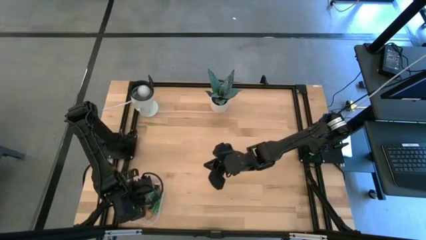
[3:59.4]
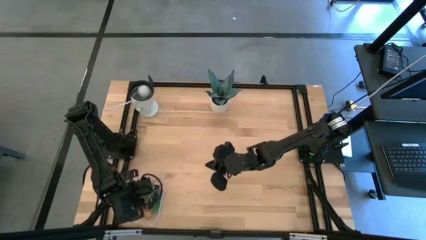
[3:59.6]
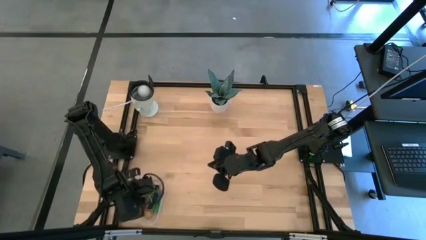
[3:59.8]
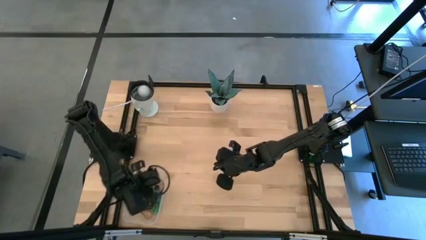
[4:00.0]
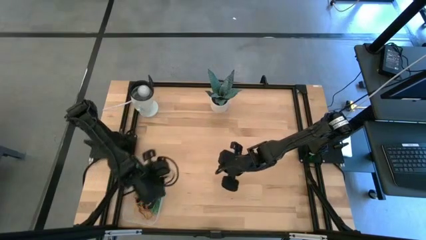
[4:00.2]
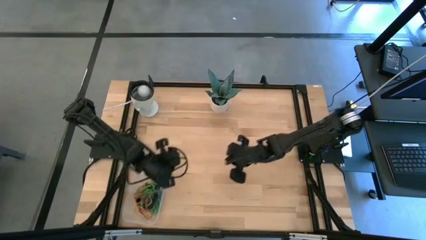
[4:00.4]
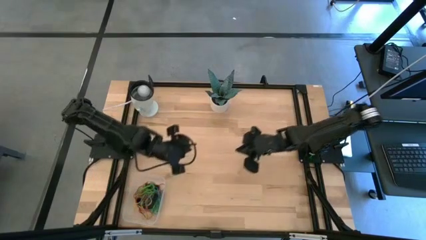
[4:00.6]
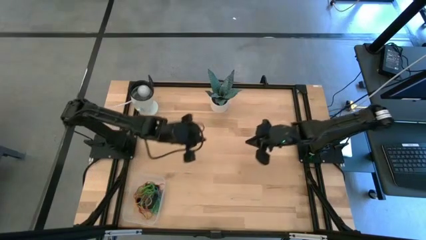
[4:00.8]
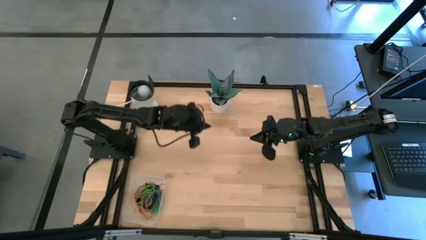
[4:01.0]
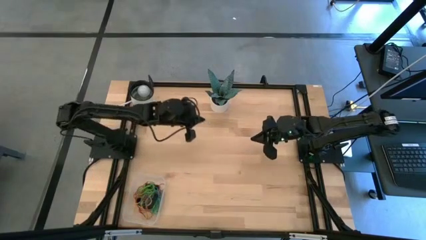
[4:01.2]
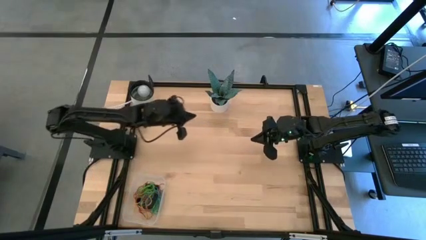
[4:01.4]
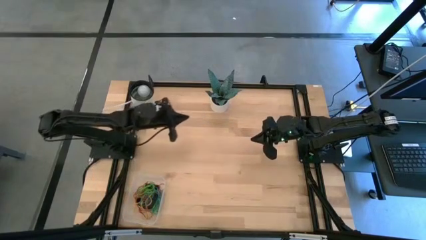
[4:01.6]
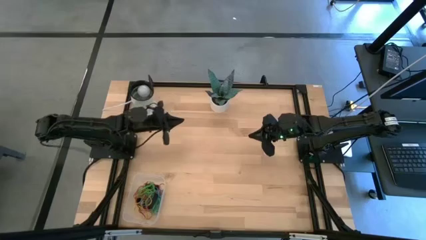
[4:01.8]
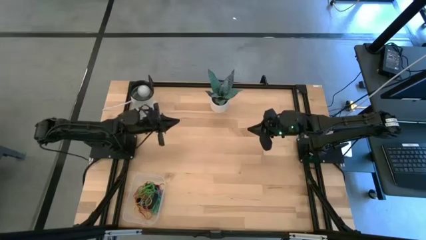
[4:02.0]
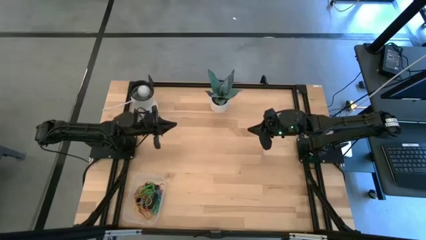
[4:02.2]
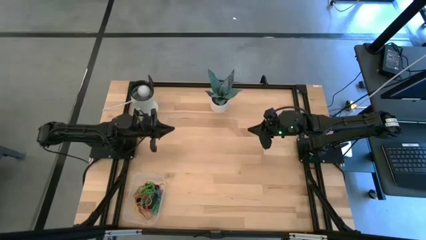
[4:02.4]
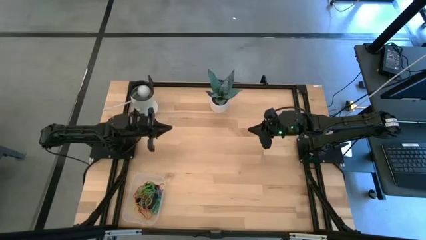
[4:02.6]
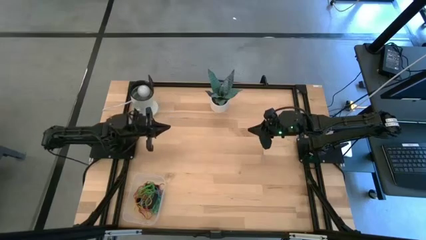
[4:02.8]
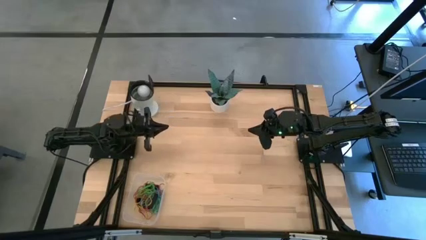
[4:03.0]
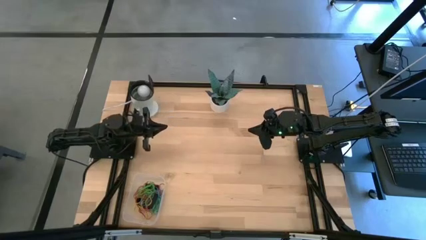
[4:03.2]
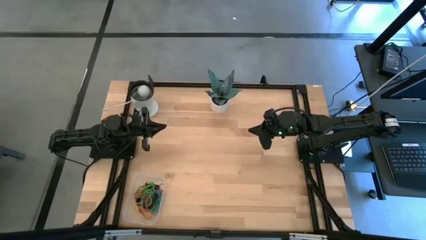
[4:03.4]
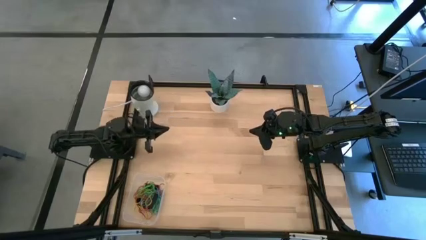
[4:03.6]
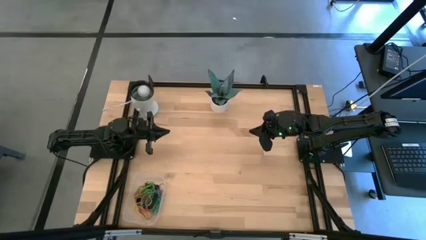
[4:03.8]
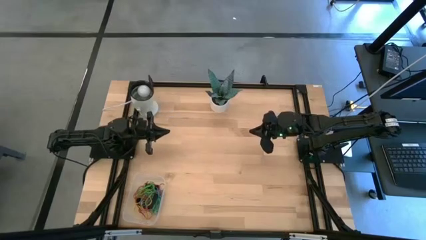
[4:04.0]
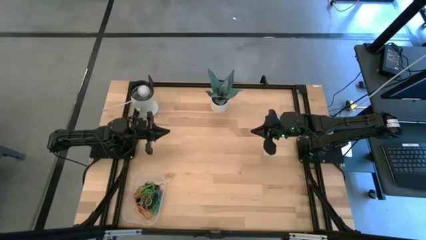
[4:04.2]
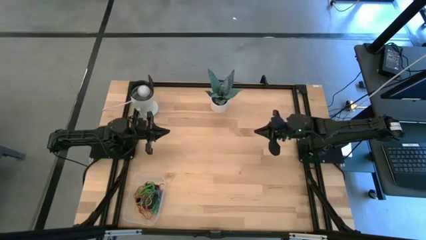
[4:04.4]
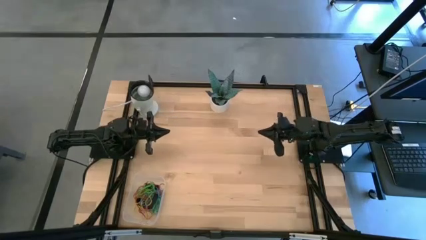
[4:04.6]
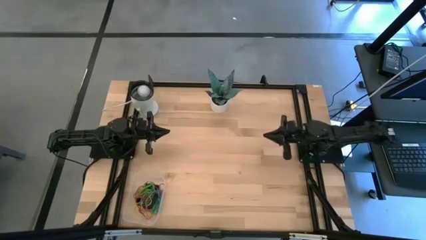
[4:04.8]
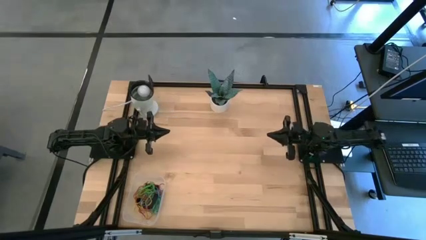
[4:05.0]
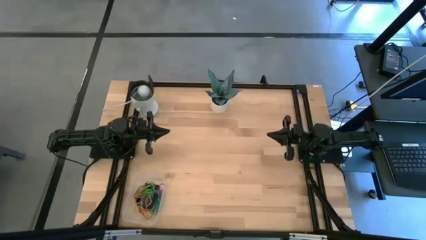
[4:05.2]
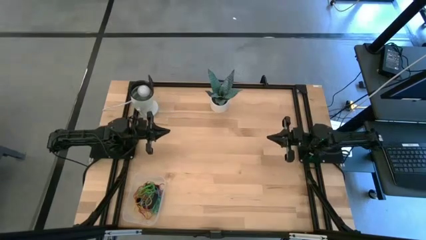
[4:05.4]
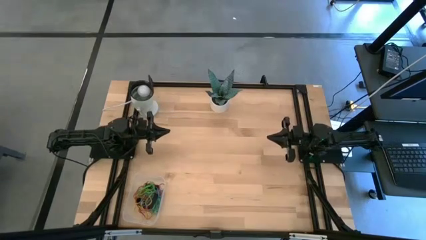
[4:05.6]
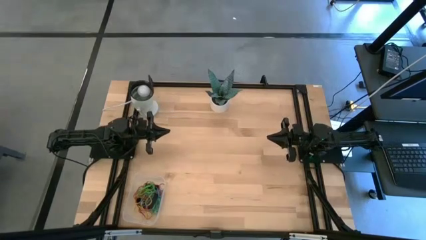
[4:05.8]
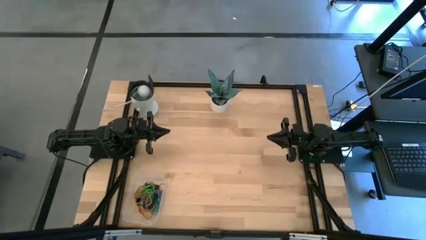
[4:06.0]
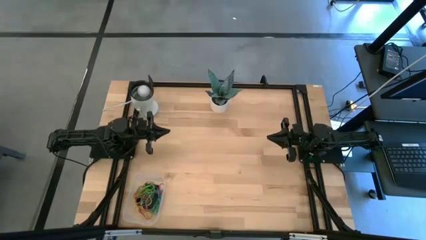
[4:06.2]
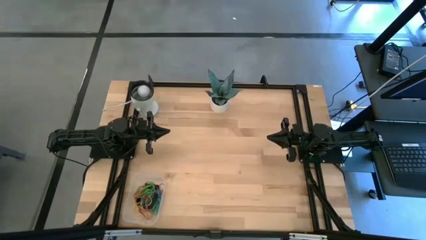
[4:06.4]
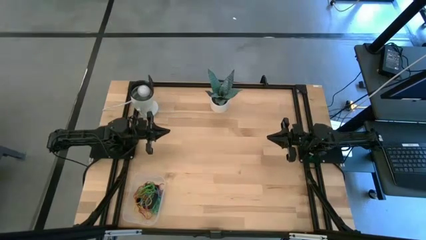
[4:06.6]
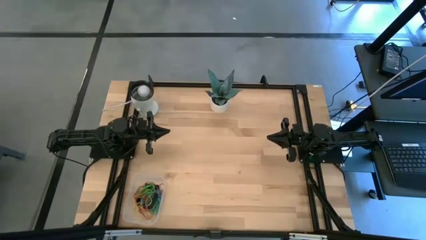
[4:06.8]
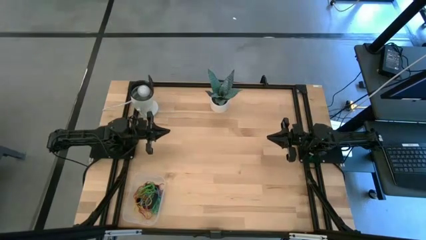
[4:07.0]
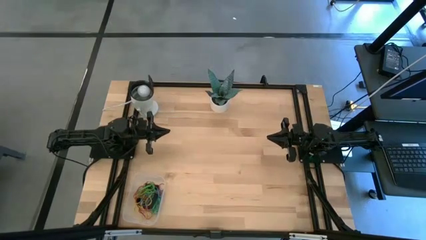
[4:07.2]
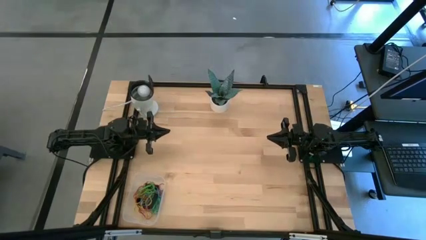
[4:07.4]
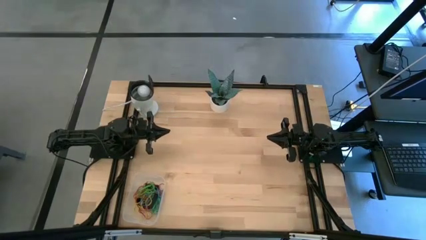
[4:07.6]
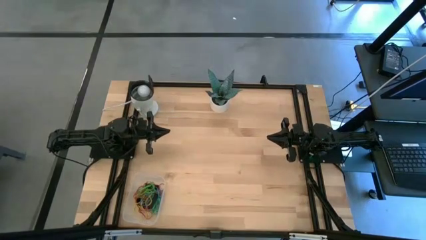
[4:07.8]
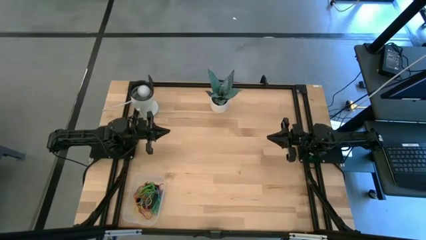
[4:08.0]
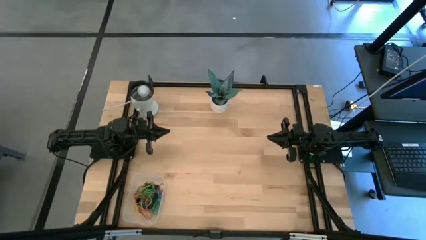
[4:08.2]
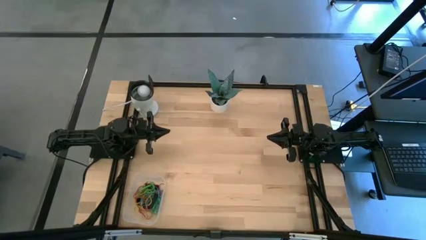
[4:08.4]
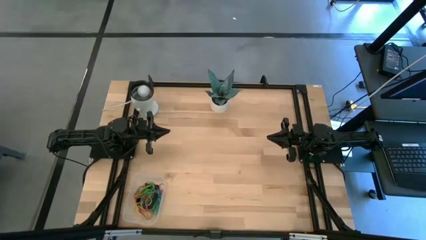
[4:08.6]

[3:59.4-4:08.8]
Task: Pick and place rubber bands into bin
Return to Home Position

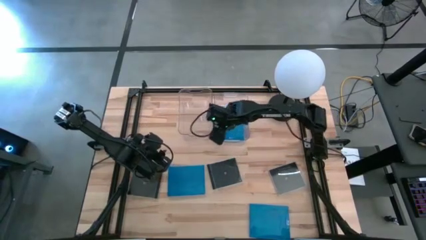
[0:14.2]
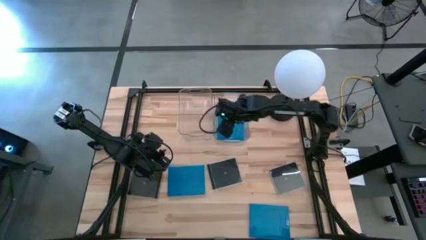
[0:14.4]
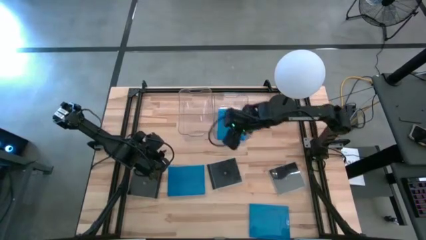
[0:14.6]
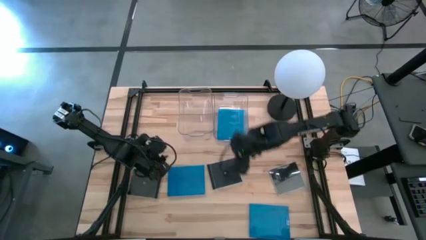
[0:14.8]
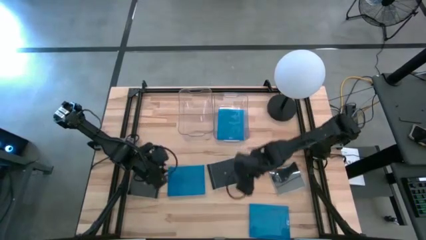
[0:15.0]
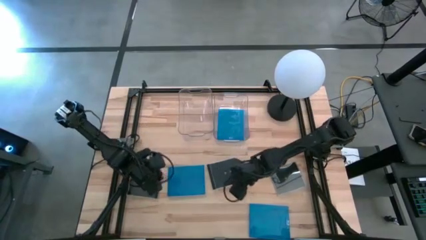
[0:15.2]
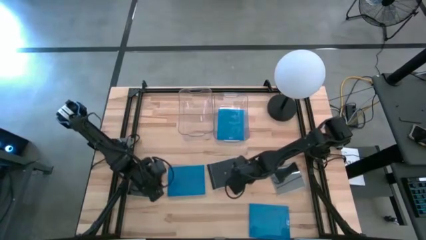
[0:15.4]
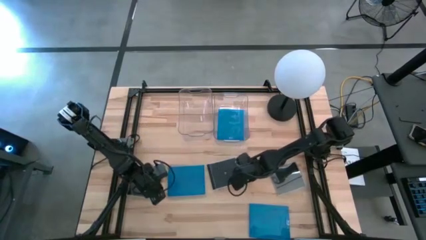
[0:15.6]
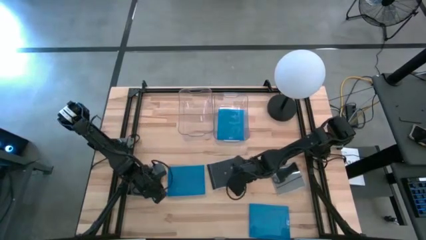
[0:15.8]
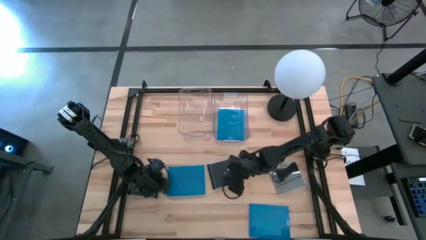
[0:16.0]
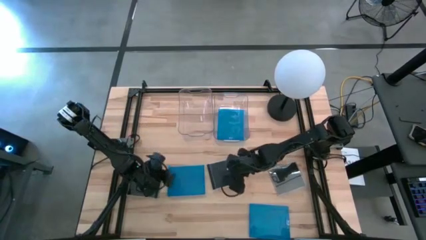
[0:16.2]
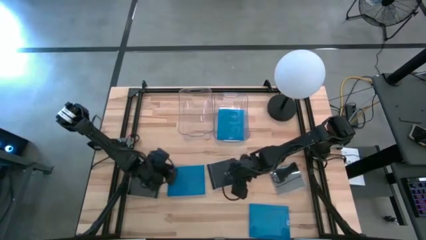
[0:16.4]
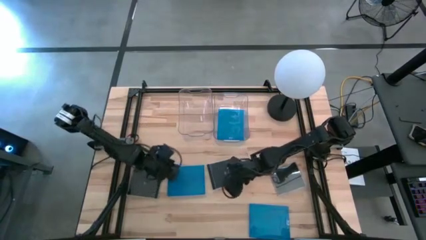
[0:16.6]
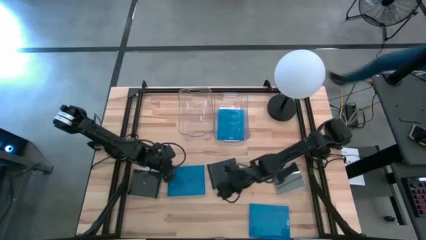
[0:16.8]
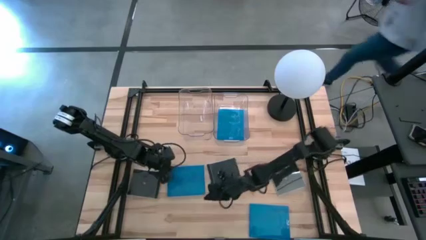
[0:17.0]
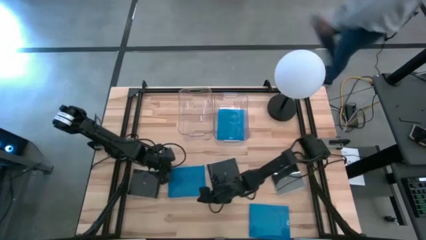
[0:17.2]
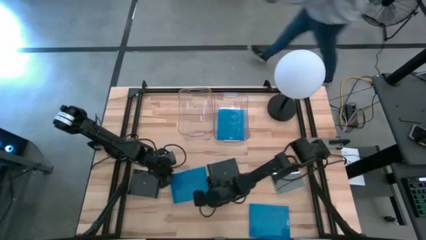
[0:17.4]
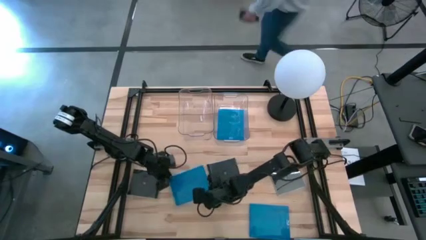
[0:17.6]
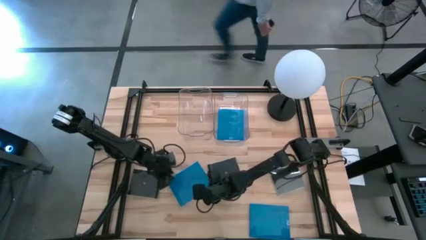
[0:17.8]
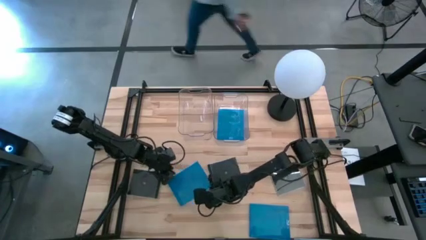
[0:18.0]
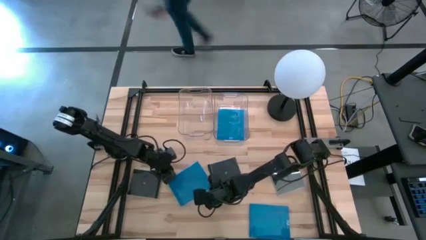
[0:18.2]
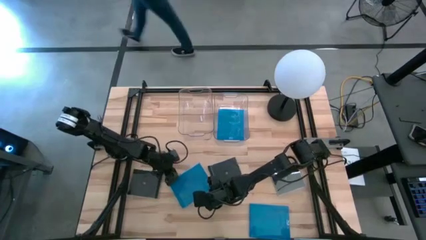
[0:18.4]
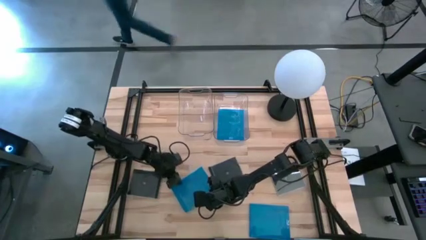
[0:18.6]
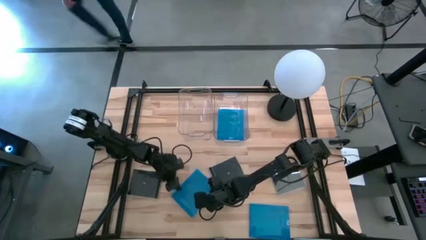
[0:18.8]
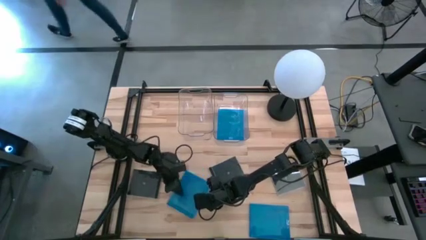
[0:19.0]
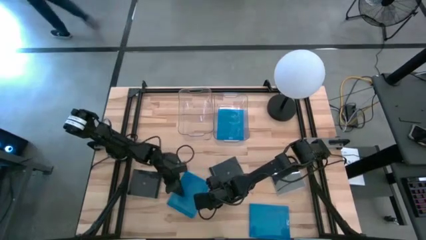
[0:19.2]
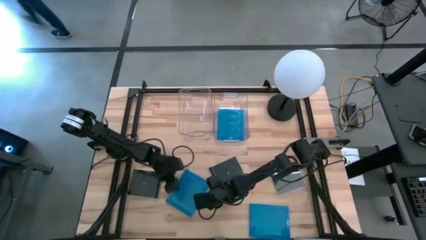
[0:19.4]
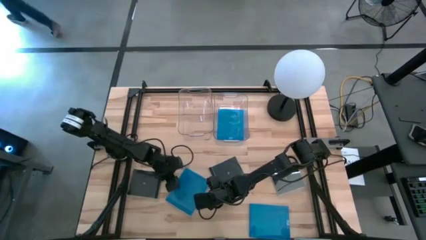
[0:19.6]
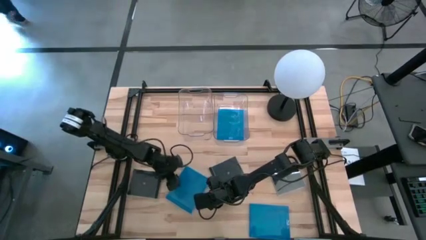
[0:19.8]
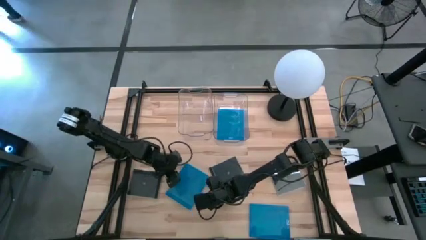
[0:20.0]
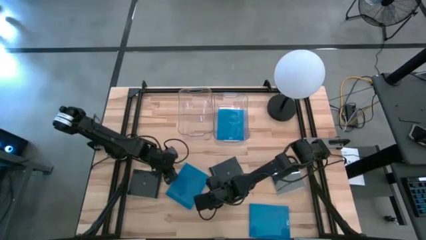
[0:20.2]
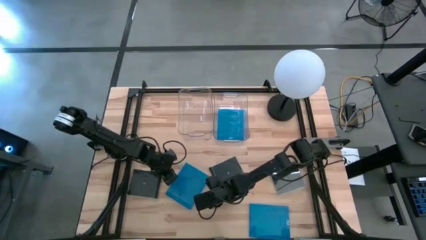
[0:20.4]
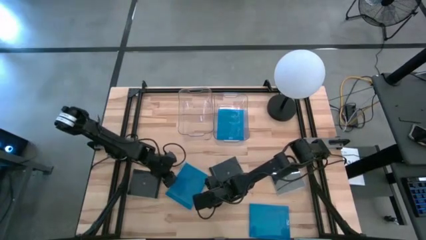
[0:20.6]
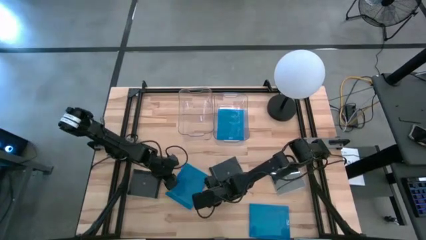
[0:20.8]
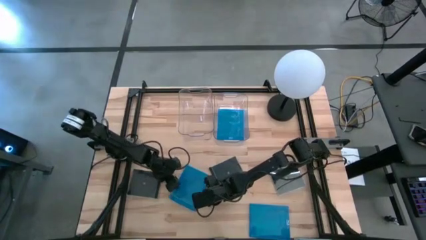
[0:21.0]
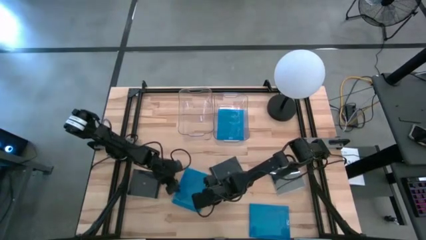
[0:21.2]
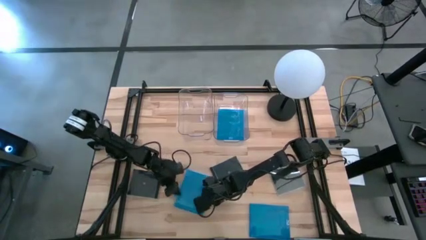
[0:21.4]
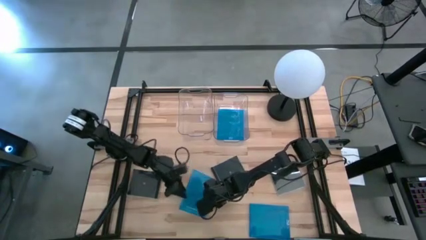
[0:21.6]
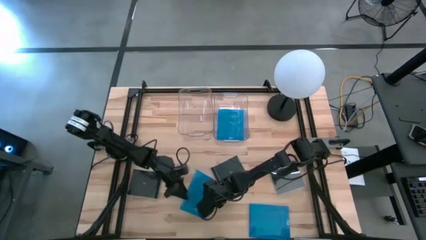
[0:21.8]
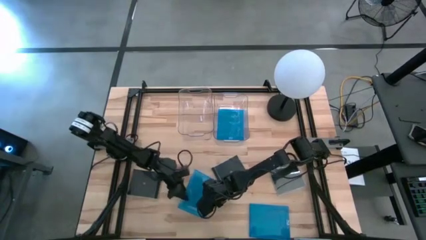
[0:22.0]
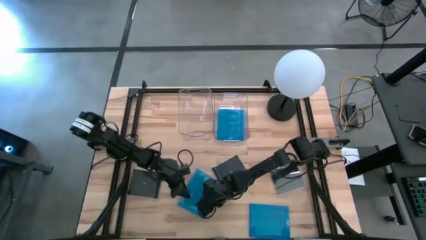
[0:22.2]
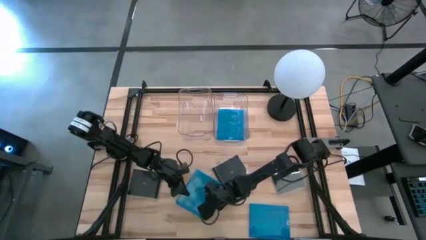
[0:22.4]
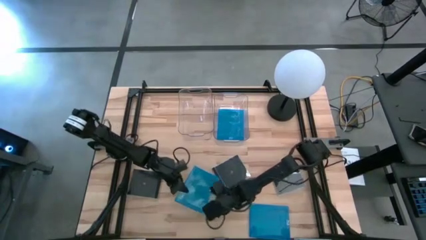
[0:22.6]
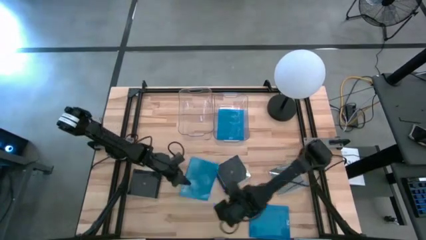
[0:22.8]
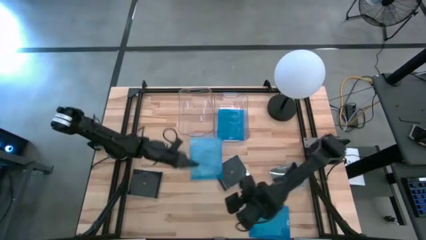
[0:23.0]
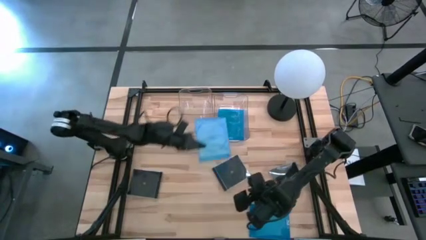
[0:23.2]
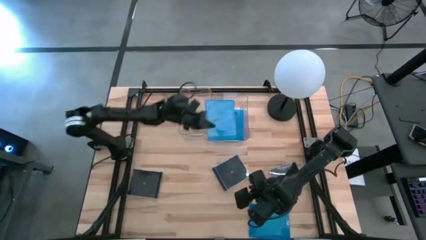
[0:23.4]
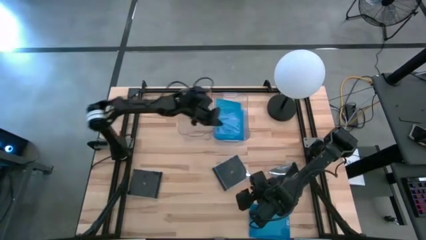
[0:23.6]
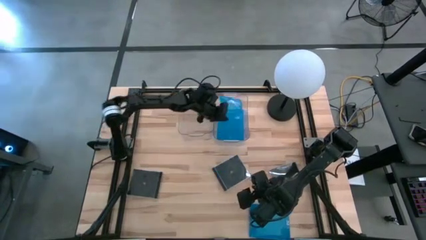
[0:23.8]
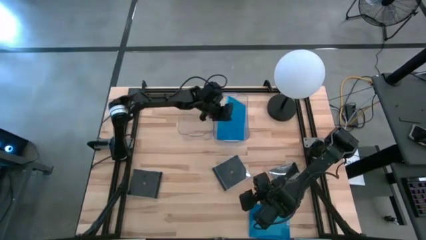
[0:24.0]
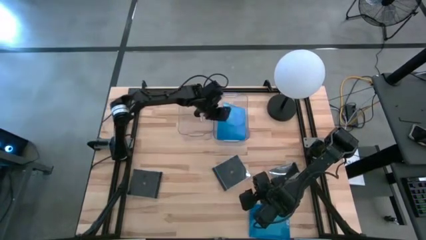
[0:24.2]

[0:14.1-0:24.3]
Task: Pick & place jewel cases by type
Put the top blue CD case into the right transparent bin
